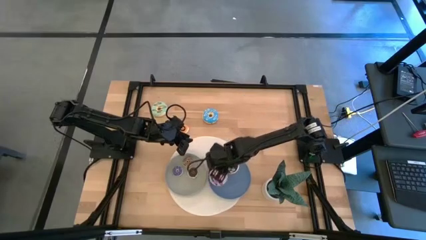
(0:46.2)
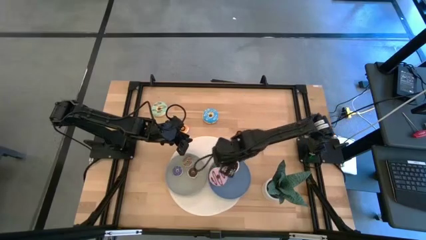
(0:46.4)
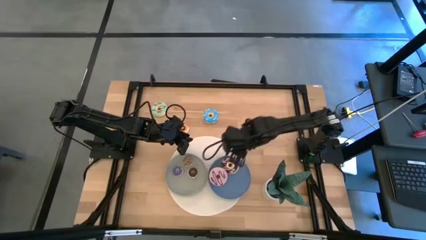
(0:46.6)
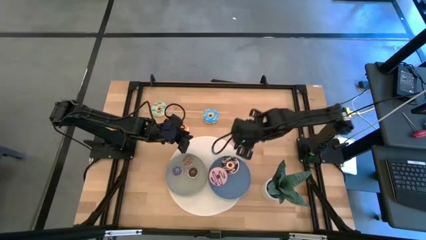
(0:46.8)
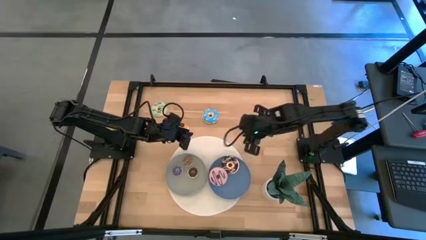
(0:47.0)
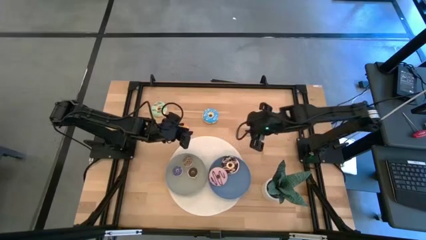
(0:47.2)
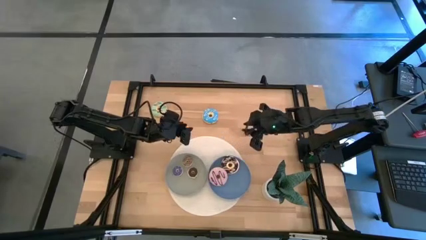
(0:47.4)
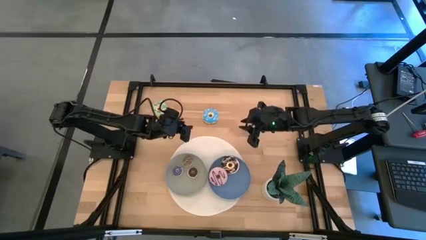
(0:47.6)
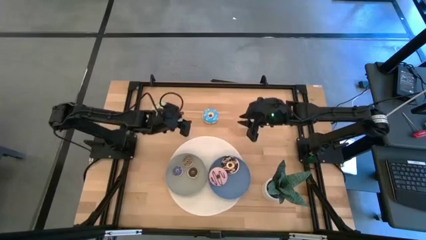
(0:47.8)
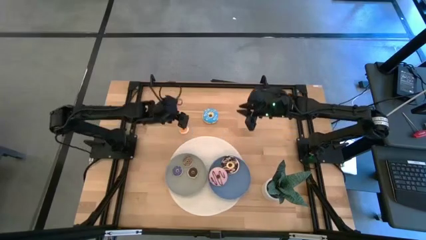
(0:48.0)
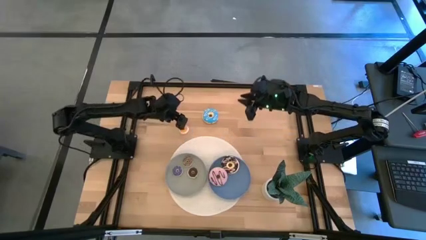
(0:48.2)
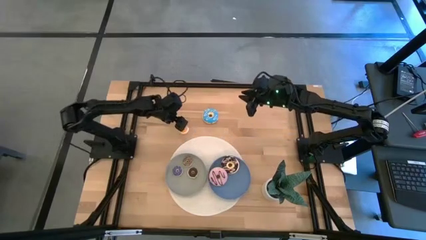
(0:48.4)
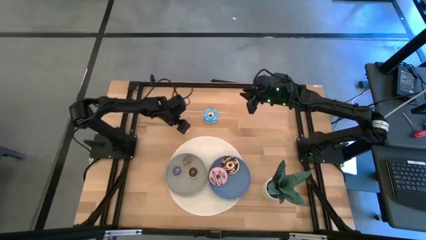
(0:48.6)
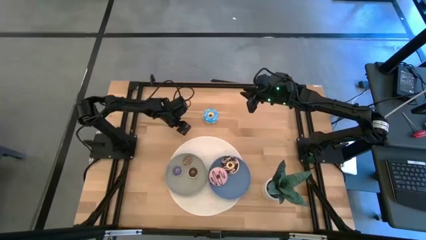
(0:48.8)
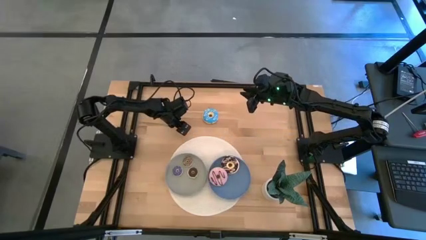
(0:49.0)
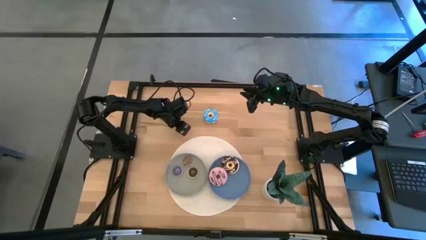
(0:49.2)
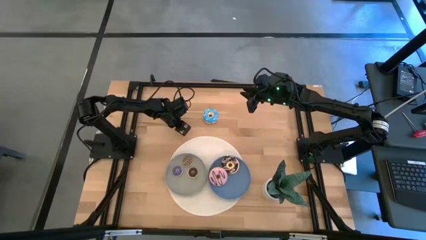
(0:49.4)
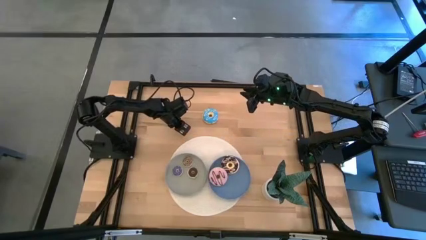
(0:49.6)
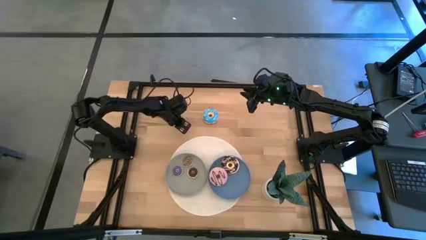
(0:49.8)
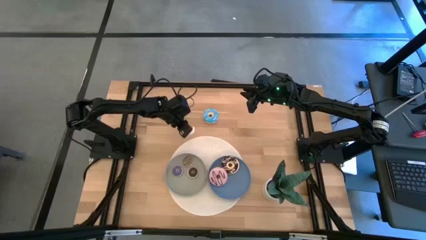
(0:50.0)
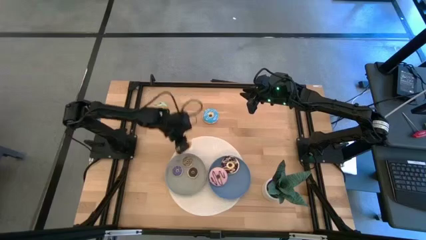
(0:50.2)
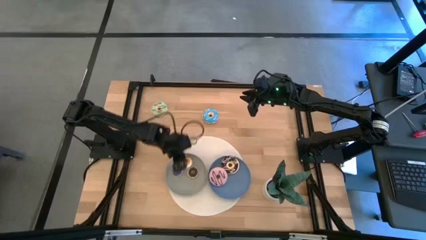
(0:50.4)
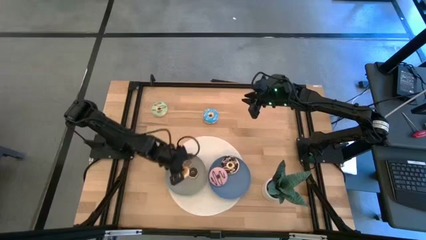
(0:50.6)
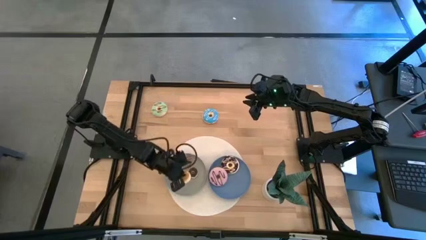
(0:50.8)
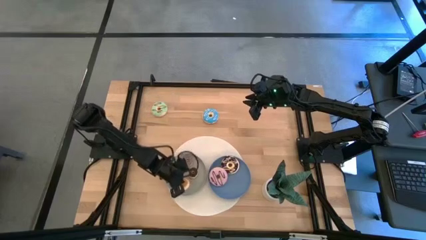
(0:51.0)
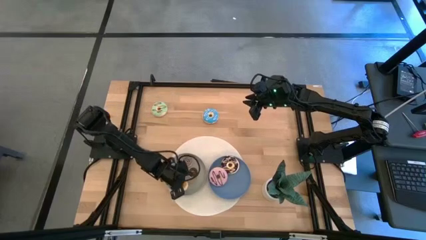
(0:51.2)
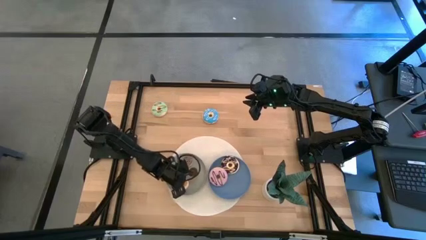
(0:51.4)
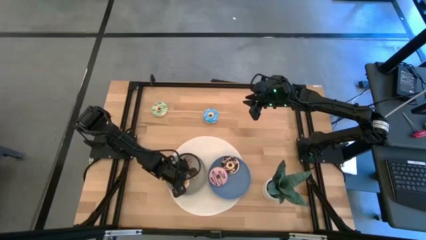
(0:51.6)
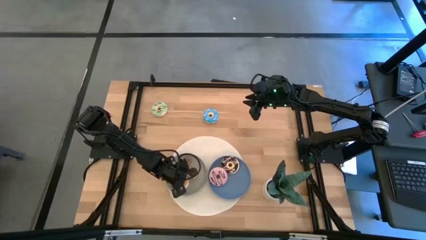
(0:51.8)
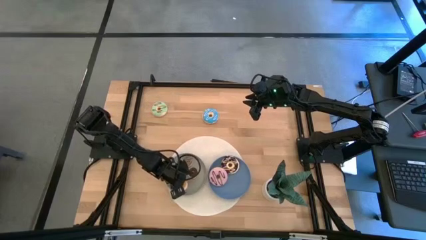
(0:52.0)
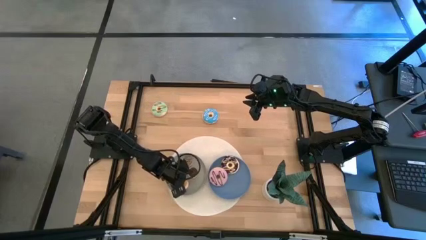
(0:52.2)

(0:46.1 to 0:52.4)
Task: Pick & Place donuts
Put the small orange donut on the gray plate

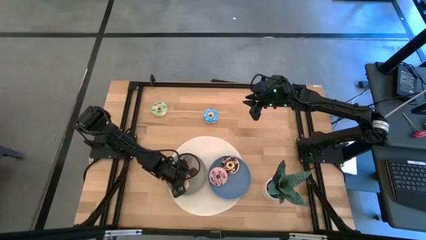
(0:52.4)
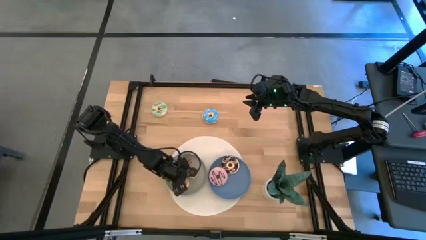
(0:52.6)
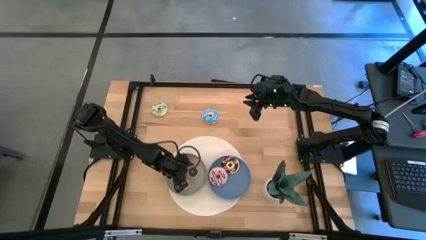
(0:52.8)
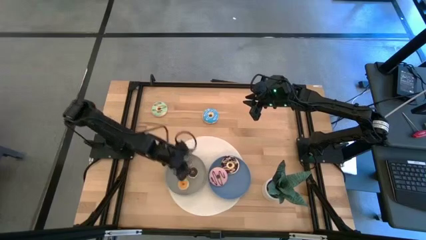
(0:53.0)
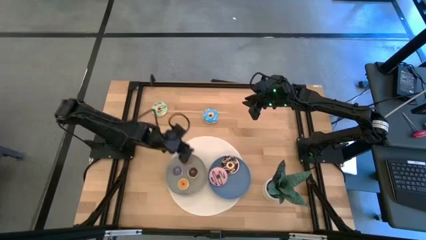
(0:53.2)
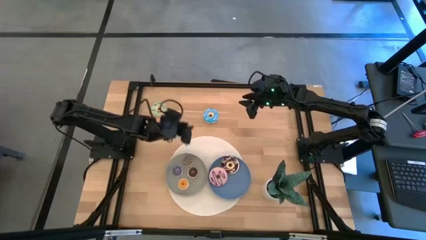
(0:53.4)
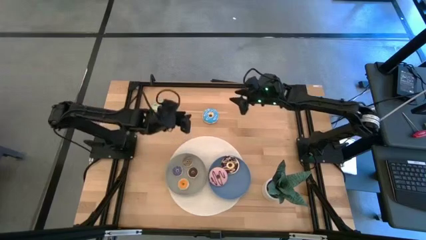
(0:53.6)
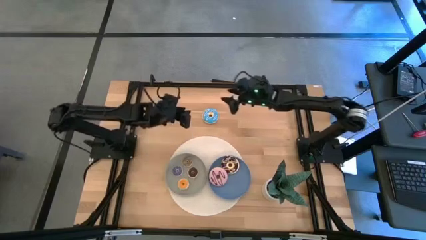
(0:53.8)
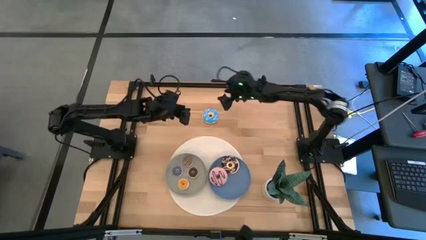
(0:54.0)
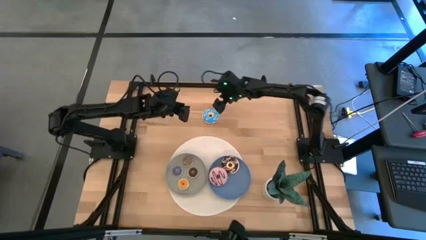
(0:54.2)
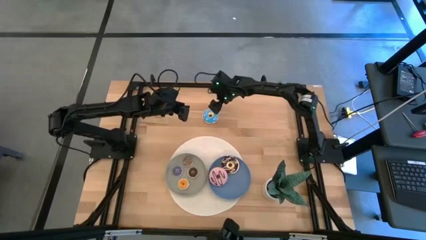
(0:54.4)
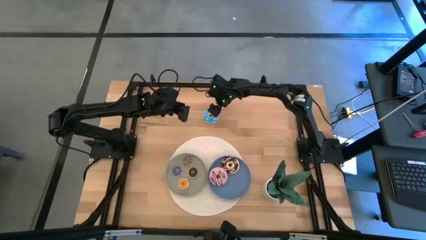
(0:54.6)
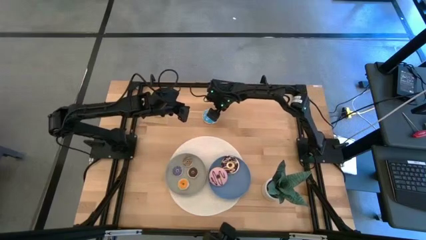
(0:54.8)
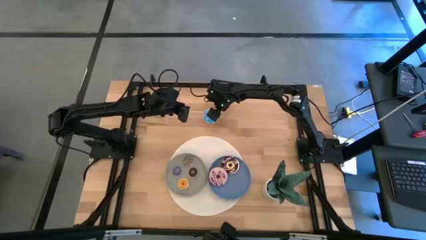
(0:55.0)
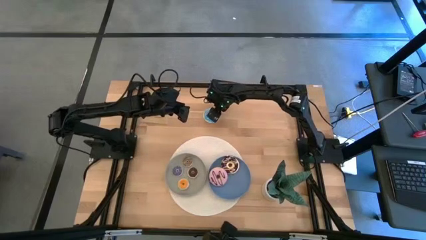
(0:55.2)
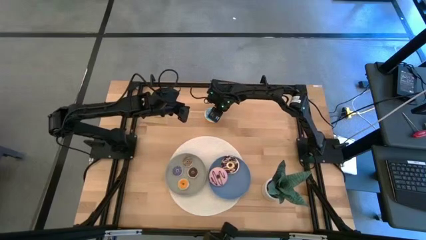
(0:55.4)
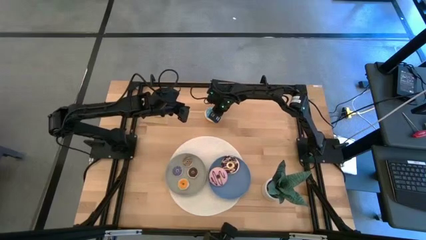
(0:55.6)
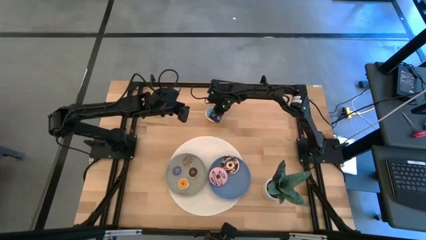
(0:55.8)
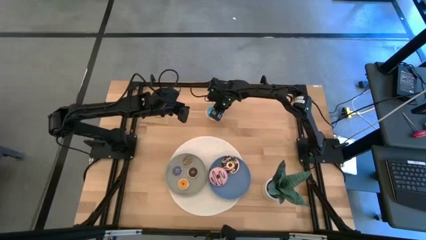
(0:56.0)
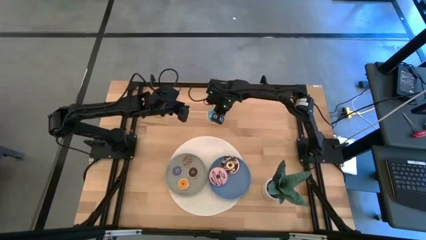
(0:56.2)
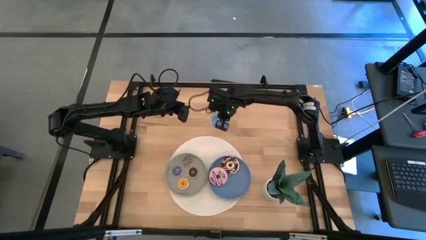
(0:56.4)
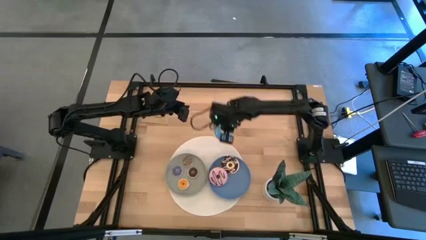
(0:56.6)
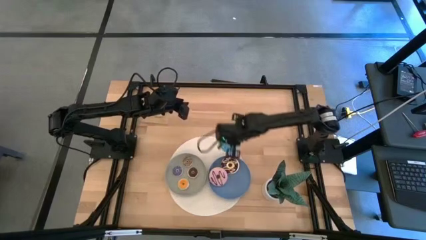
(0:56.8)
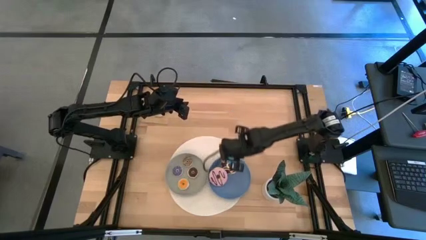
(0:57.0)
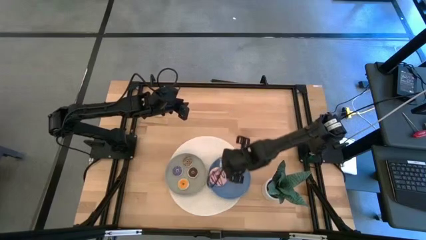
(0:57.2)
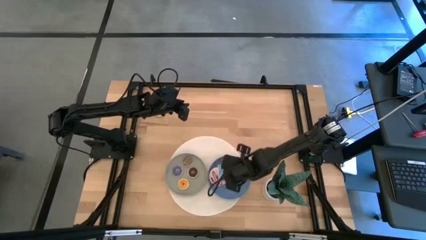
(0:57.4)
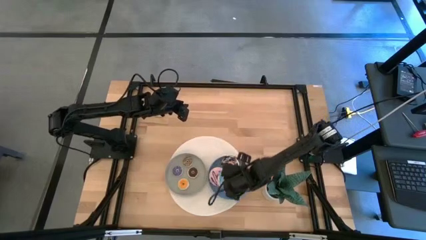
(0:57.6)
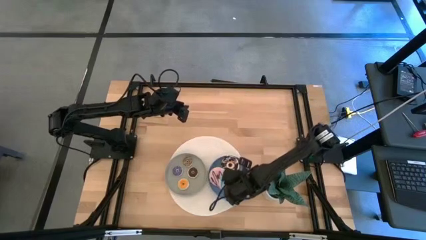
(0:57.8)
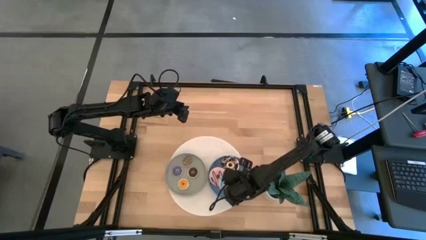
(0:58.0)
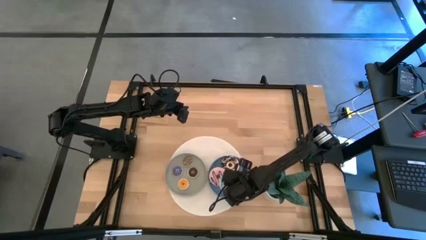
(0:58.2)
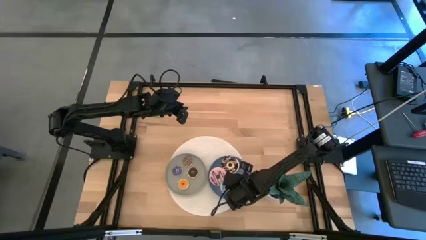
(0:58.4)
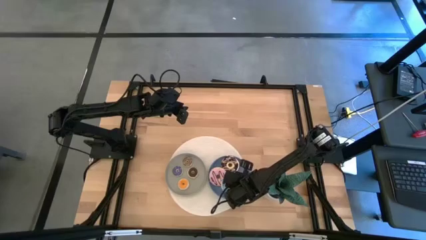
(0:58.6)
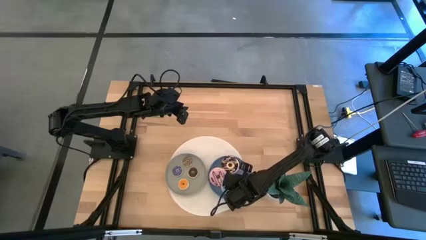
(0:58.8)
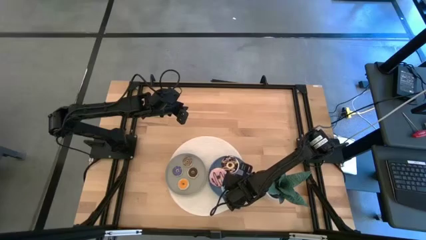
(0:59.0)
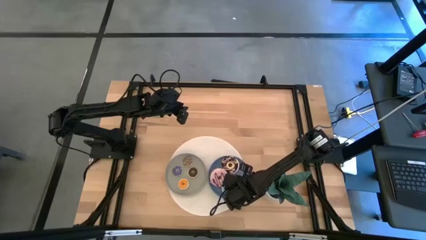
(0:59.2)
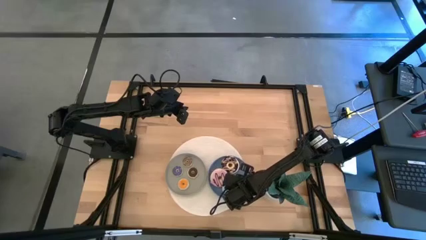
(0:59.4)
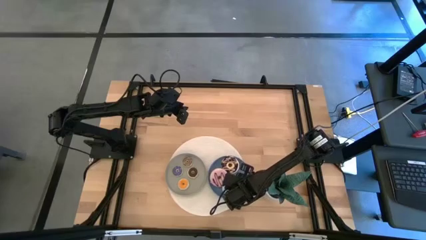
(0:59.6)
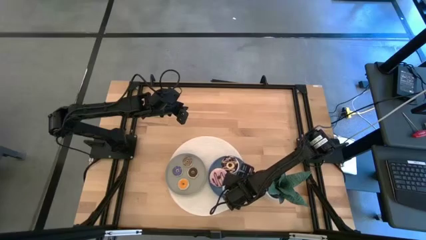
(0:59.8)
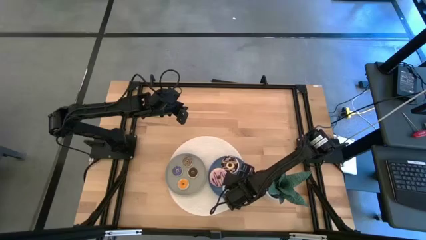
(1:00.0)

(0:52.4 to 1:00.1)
Put the big blue donut on the blue plate

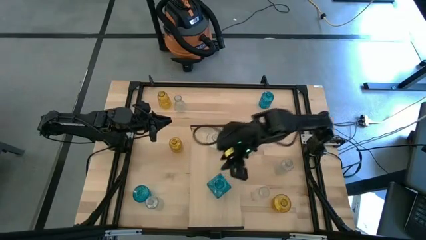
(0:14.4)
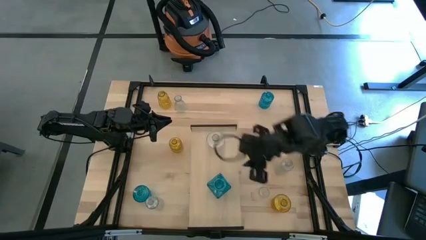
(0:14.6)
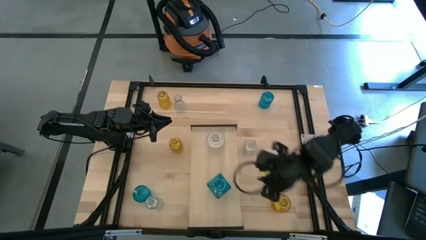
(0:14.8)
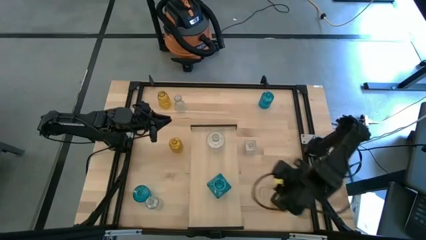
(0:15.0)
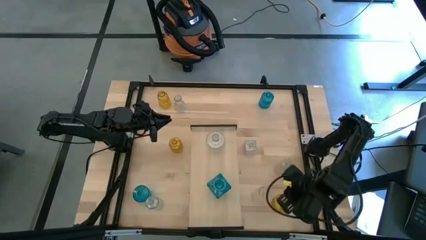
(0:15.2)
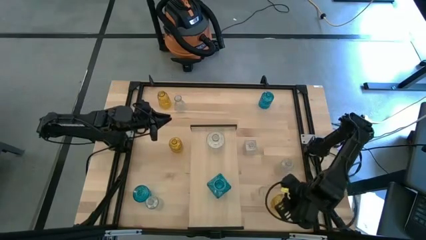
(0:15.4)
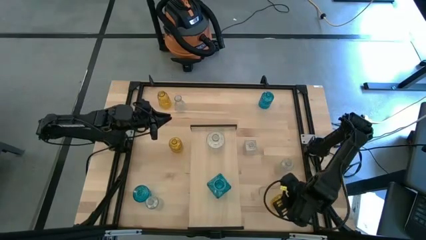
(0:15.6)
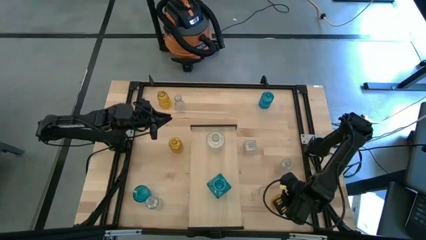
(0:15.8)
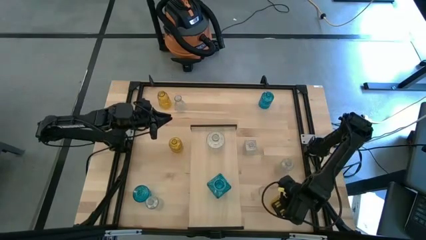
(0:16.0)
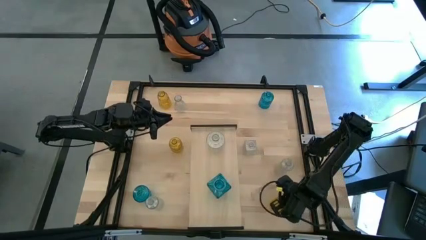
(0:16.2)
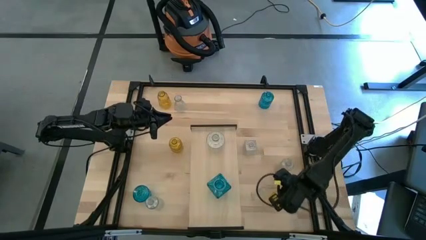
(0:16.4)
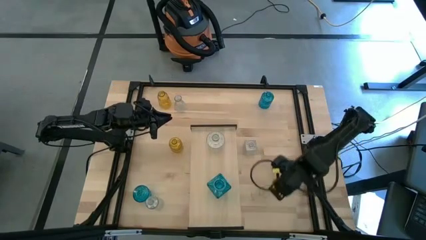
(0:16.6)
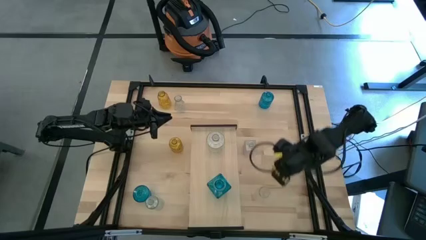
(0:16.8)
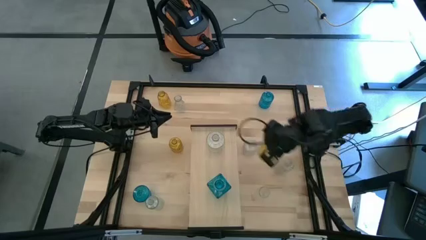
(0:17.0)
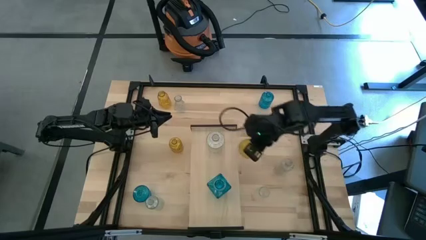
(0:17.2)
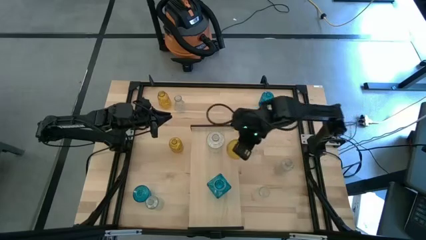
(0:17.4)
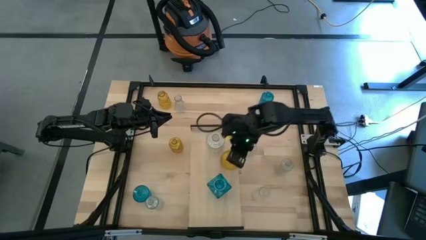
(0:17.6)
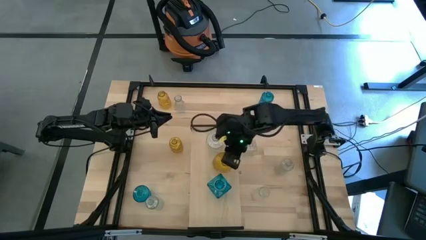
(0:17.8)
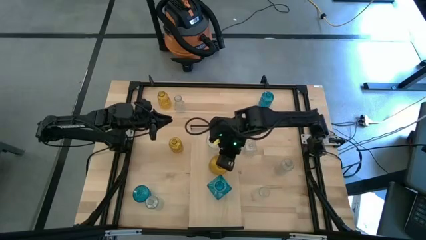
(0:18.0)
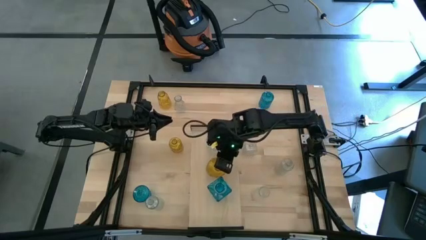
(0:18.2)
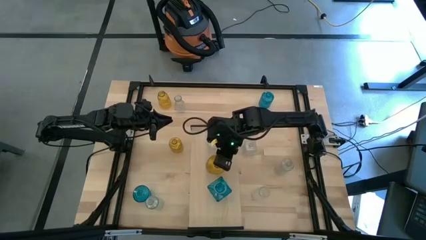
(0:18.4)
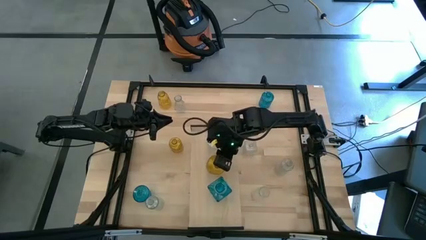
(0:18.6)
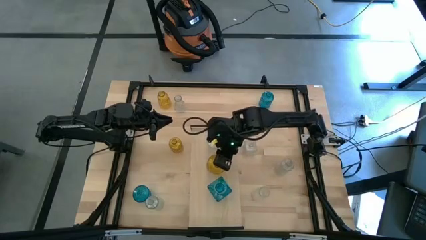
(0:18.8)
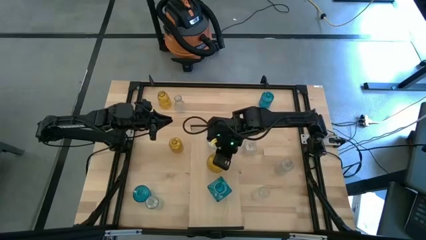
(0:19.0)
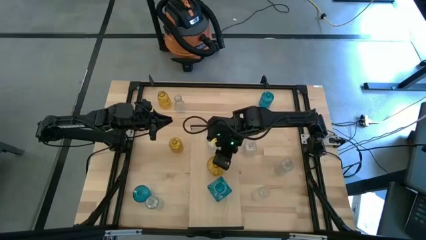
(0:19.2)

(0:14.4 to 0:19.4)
Task: sort vases onto shelf
Put the yellow vase on the shelf
